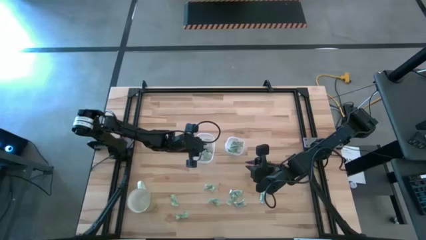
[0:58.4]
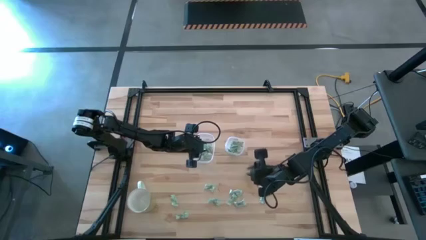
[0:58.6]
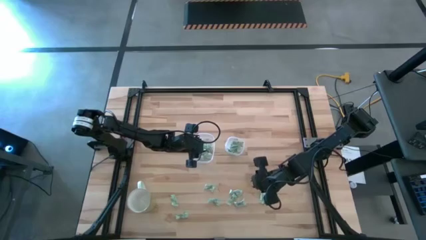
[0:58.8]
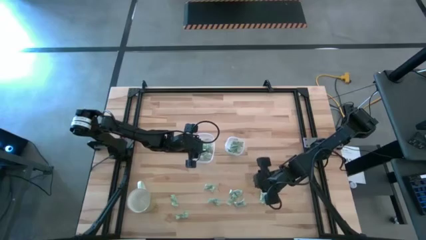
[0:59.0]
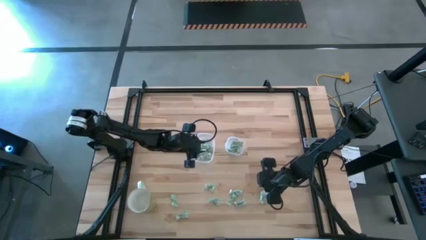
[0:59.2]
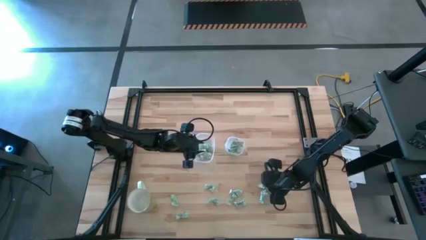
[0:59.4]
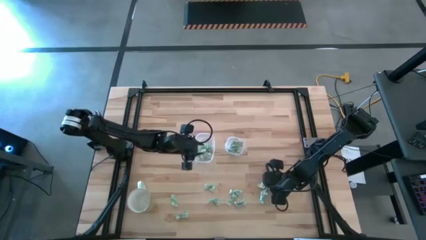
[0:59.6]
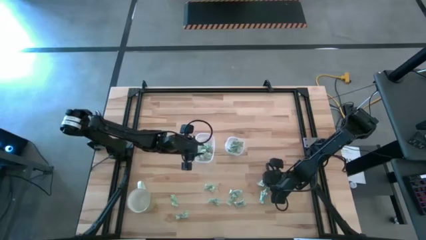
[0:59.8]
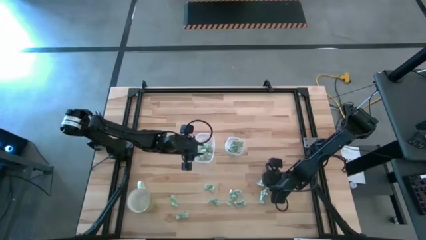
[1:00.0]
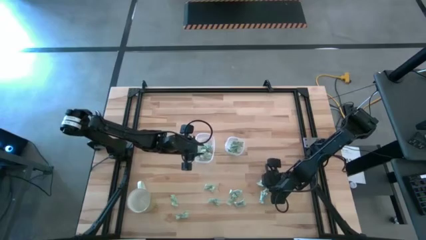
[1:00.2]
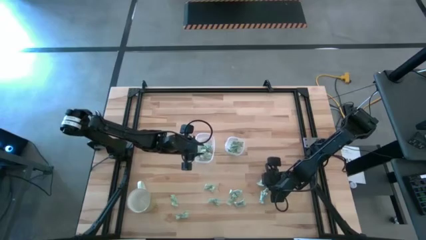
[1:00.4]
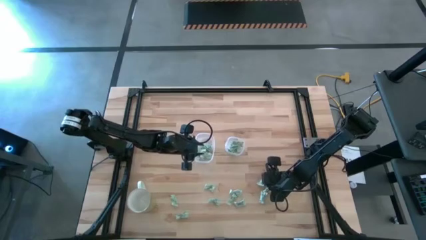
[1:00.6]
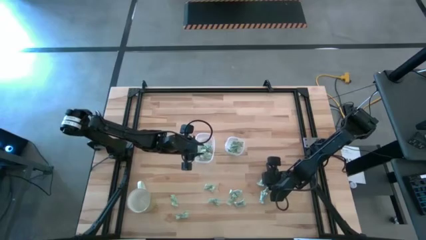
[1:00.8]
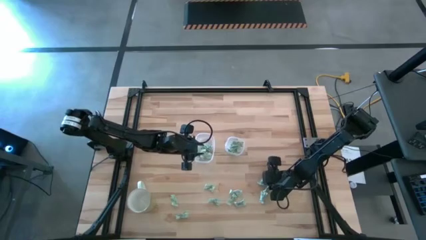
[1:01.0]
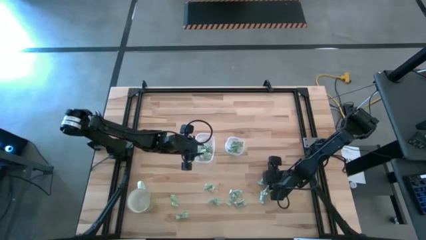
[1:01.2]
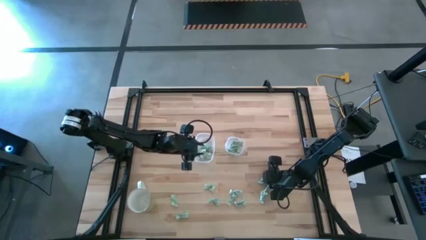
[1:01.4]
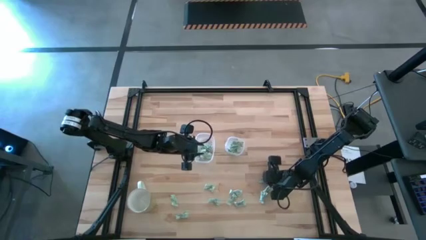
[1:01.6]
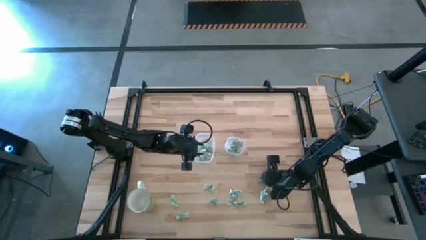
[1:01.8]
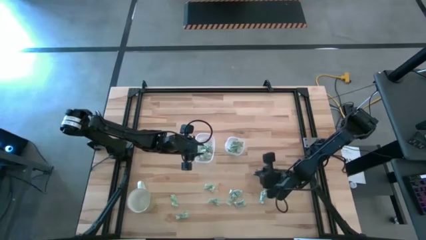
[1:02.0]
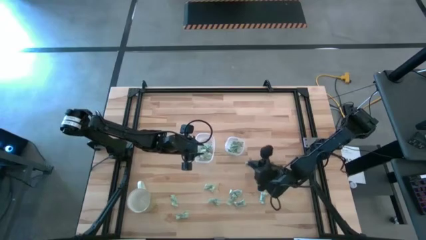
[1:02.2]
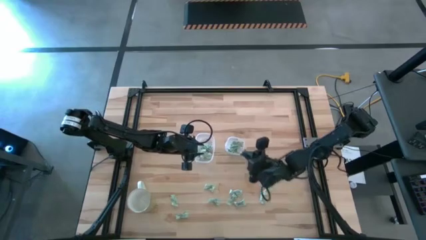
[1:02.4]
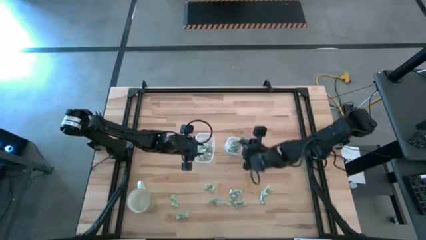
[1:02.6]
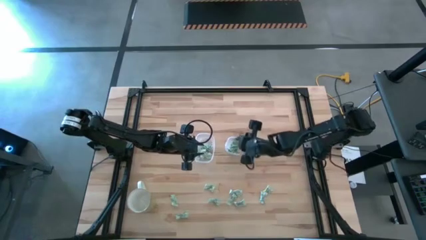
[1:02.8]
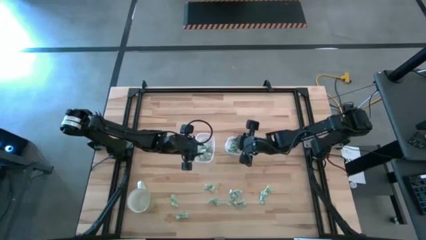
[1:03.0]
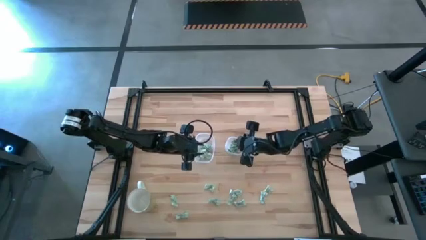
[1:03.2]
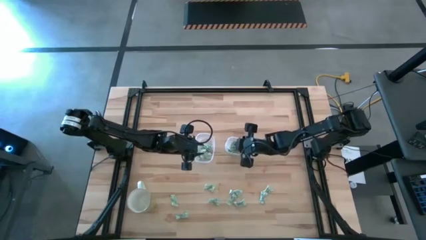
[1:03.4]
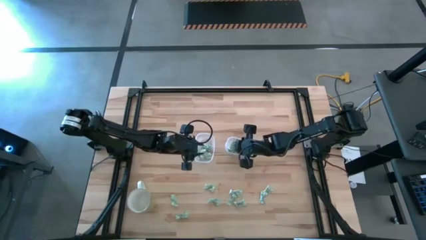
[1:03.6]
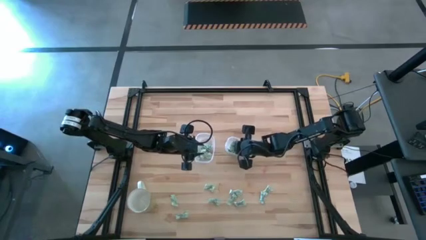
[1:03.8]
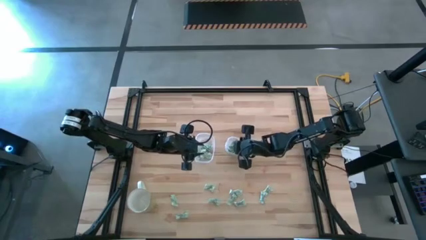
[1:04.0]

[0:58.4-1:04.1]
Task: Pick and place items into bin
Put the white stevia packet into the right transparent bin

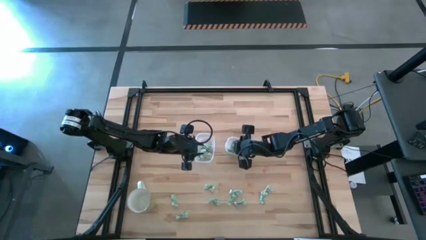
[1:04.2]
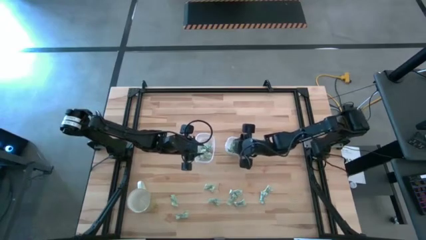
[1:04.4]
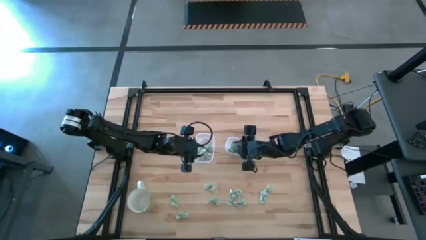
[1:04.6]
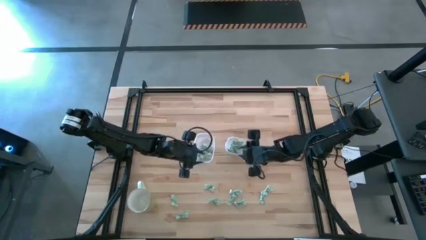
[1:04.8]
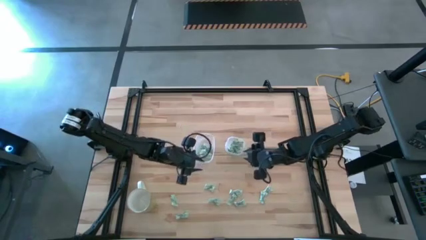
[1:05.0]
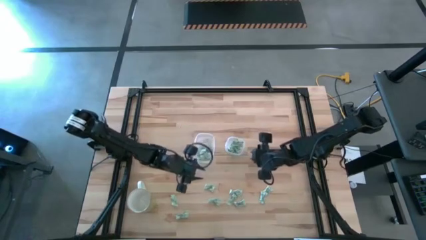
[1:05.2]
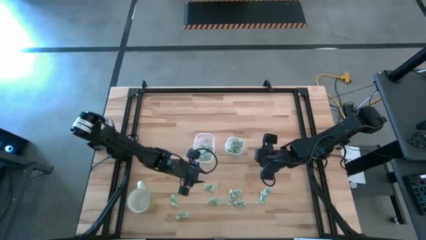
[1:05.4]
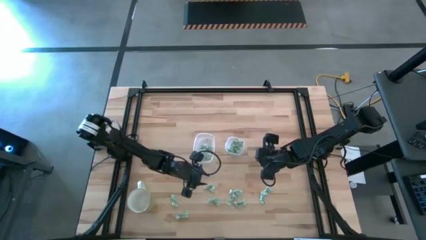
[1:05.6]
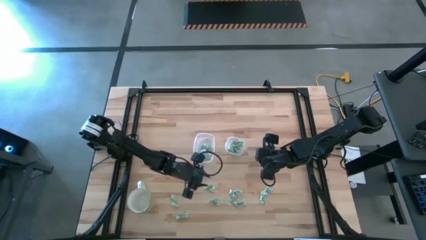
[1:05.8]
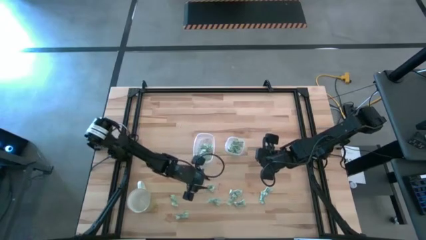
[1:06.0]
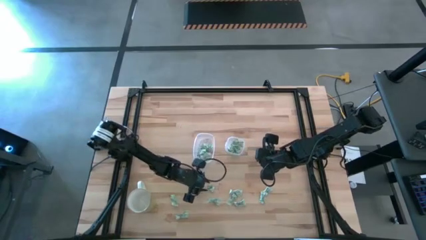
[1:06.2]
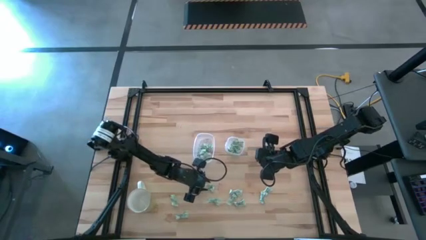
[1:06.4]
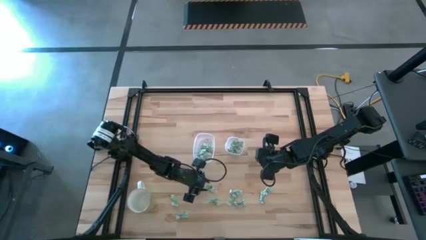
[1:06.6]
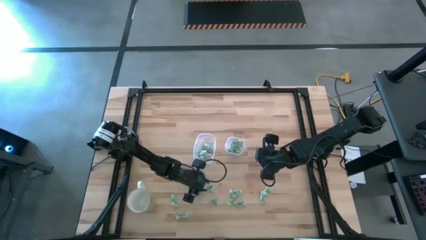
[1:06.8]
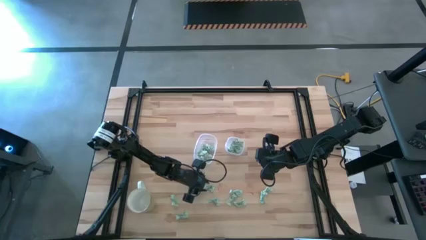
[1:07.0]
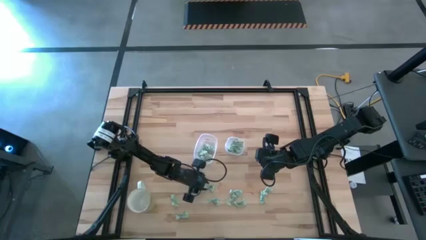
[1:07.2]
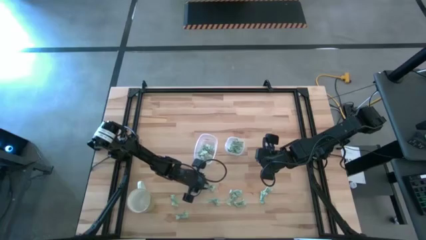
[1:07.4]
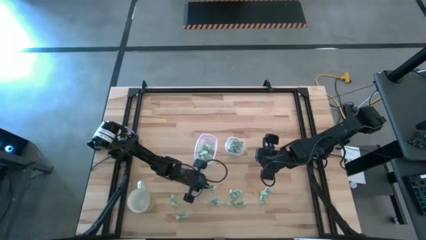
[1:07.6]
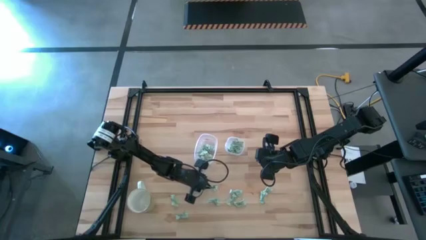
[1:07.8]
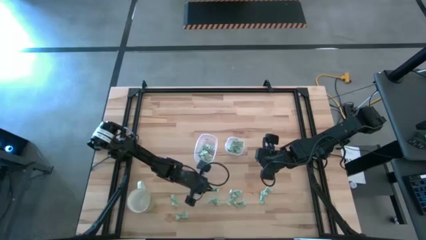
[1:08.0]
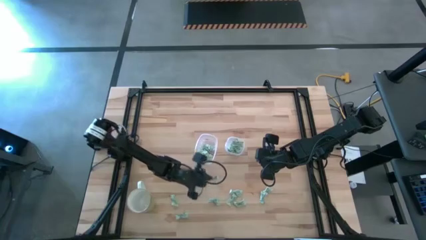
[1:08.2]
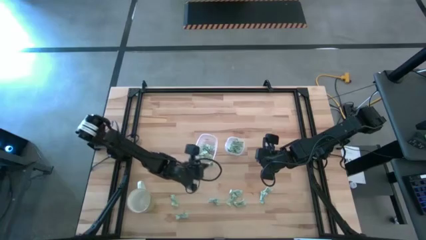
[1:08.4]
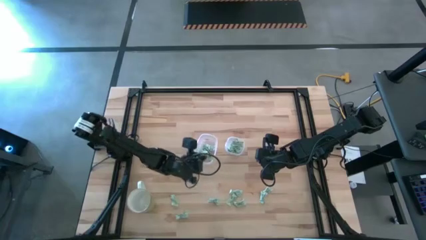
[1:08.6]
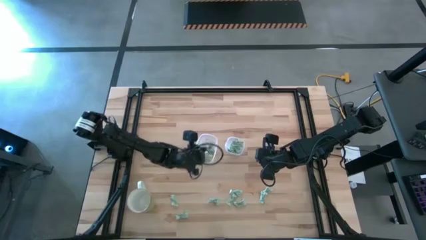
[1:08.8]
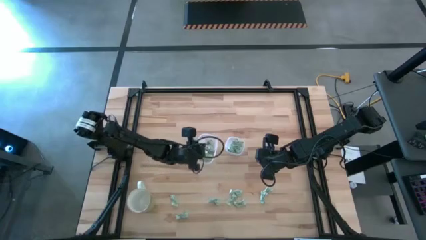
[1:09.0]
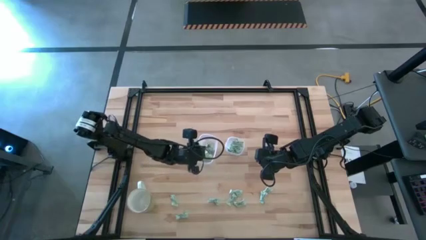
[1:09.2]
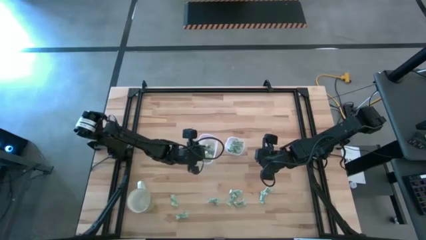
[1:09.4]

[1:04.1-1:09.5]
Put the white stevia packet into the left transparent bin

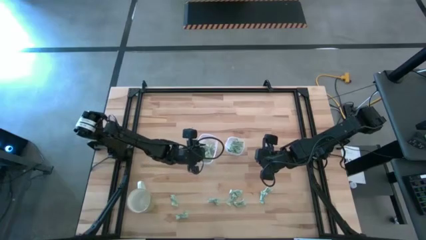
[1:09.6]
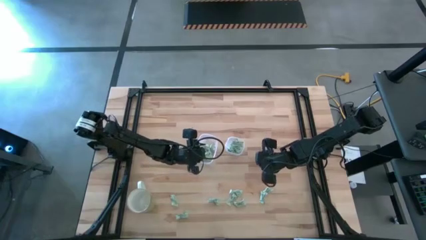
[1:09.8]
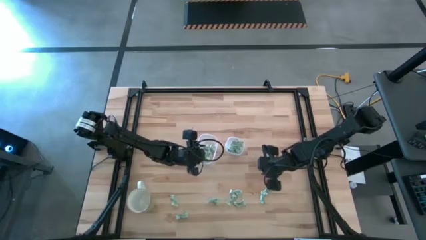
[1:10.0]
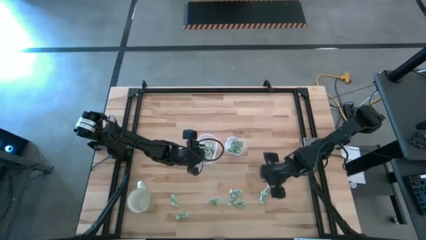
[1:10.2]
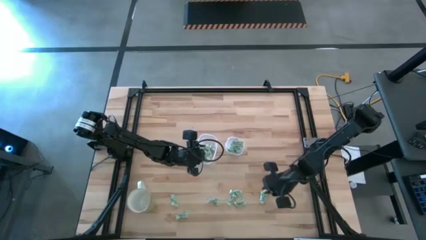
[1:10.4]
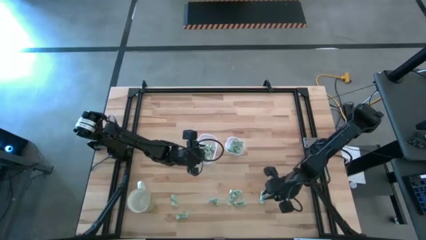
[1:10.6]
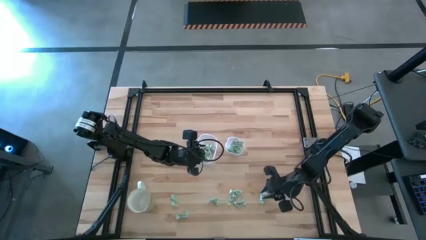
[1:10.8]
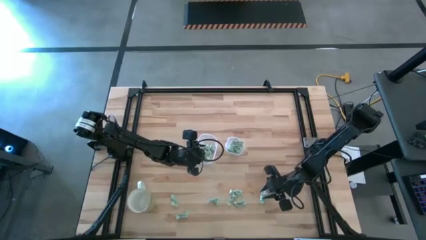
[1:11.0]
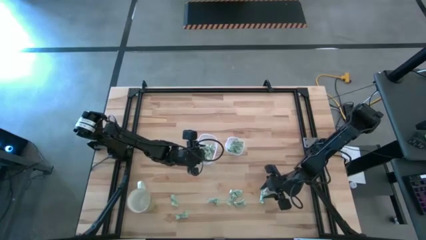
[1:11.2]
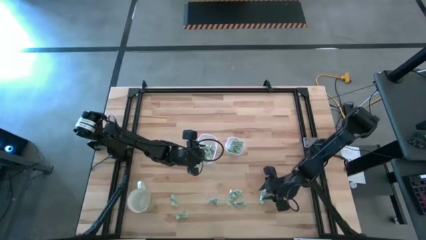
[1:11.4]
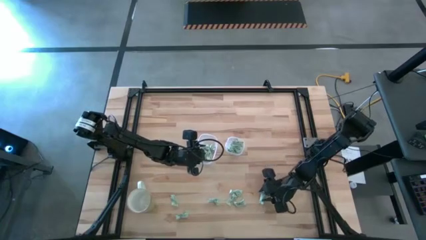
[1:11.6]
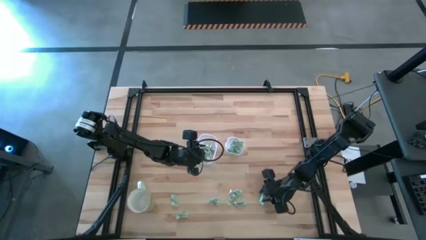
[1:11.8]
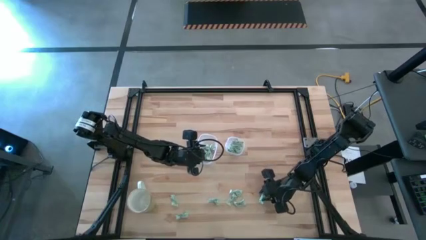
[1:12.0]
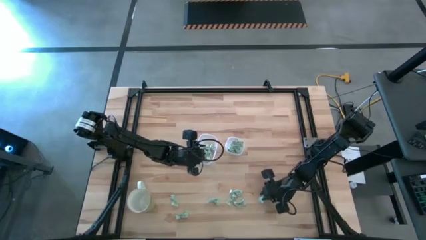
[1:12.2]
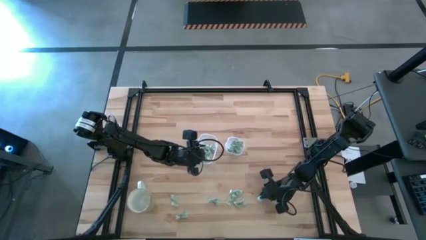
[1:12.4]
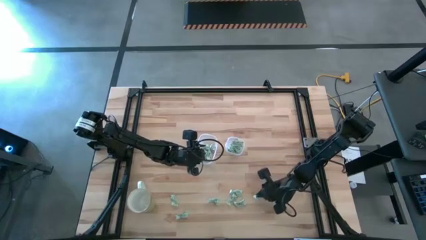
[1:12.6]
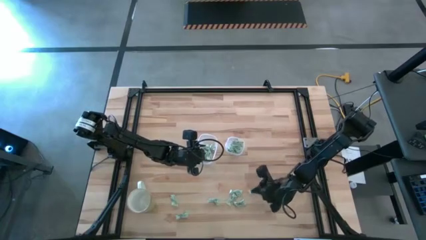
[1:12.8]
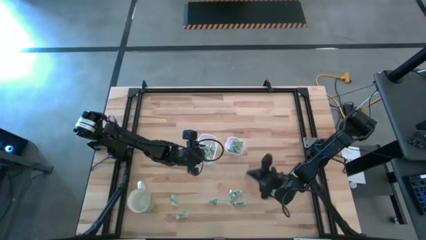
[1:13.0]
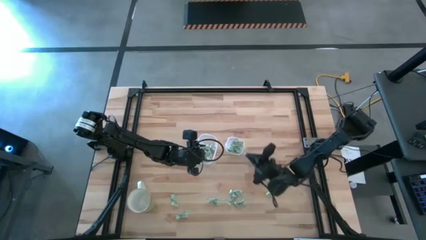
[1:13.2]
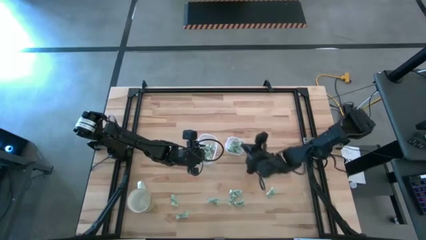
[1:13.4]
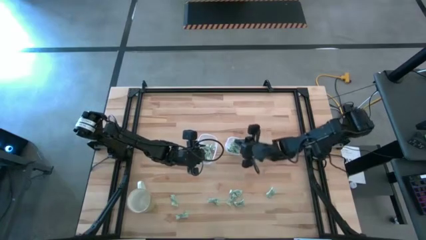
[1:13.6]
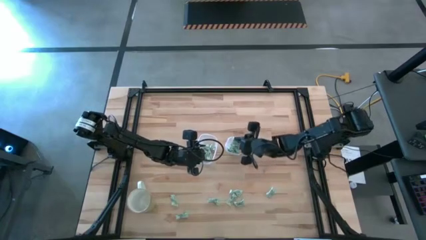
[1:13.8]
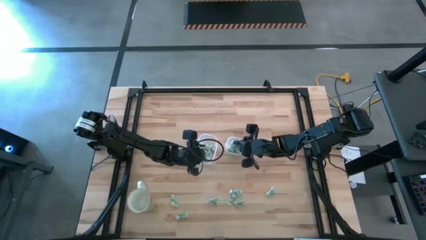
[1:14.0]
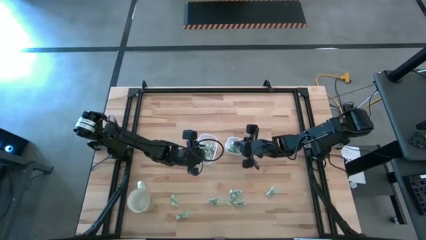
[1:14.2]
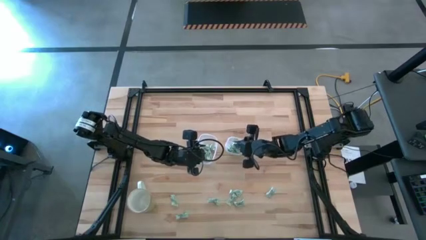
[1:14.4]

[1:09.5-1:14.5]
Put the white stevia packet into the right transparent bin
